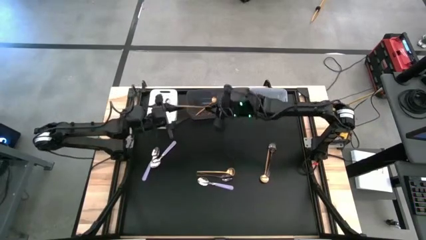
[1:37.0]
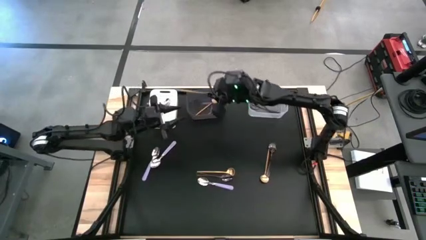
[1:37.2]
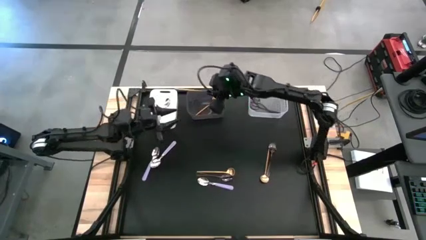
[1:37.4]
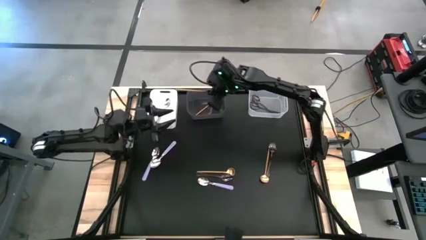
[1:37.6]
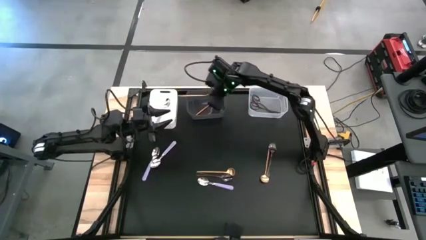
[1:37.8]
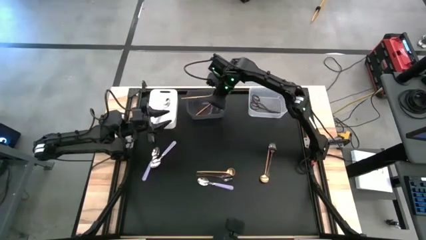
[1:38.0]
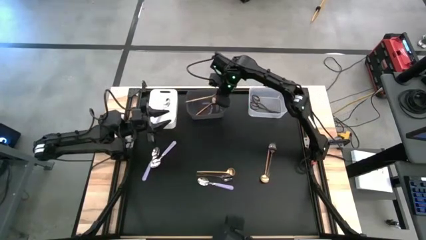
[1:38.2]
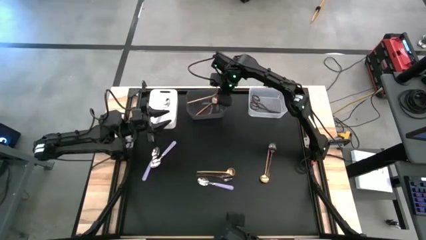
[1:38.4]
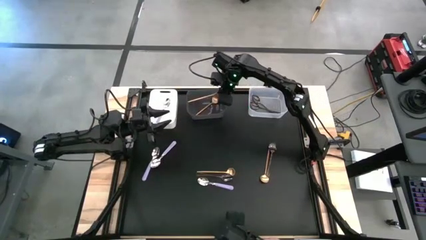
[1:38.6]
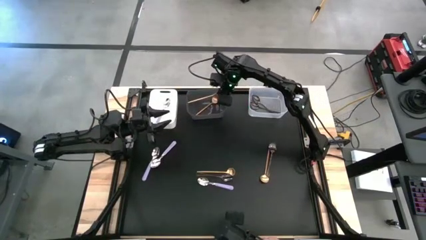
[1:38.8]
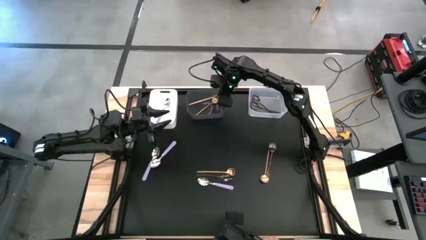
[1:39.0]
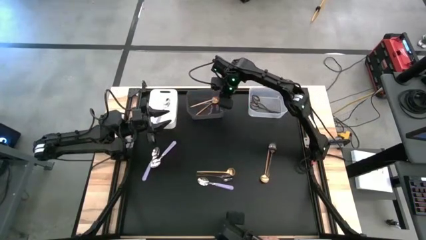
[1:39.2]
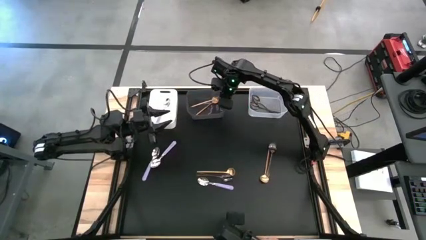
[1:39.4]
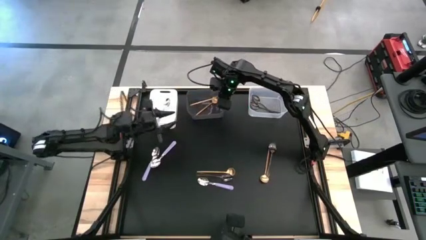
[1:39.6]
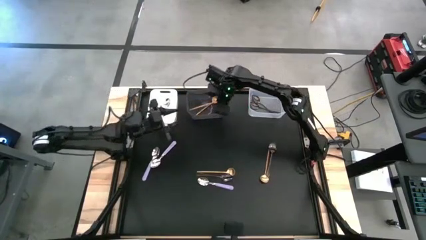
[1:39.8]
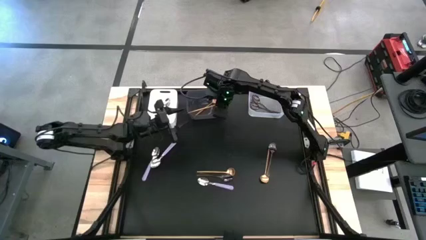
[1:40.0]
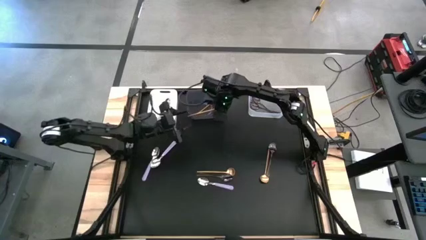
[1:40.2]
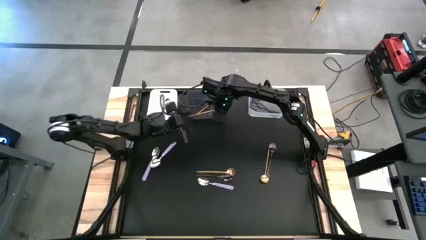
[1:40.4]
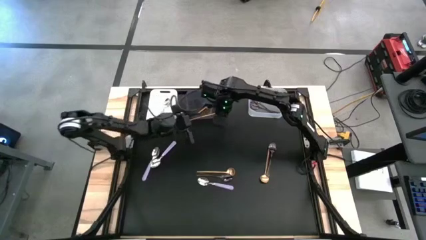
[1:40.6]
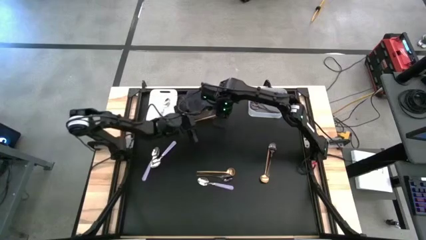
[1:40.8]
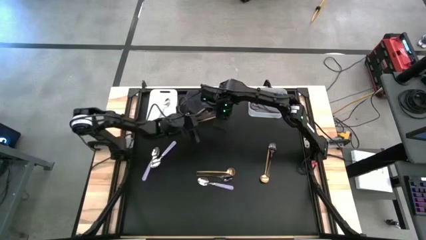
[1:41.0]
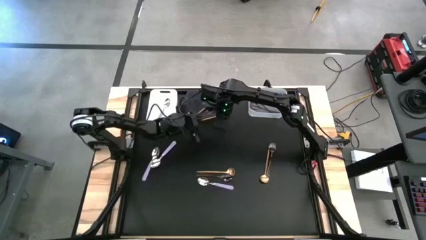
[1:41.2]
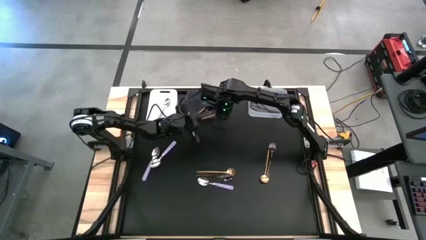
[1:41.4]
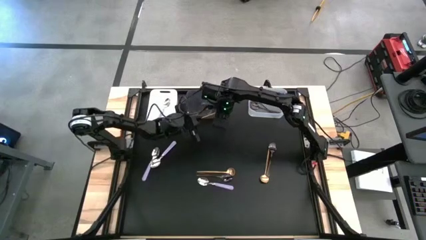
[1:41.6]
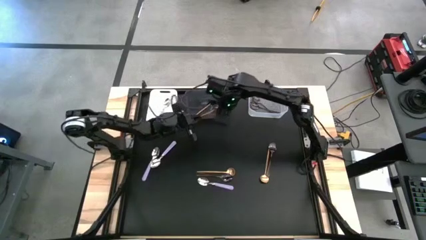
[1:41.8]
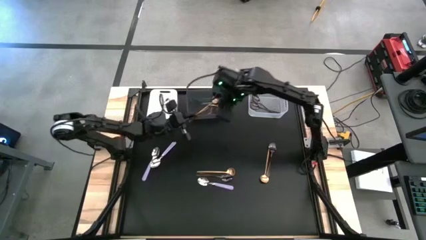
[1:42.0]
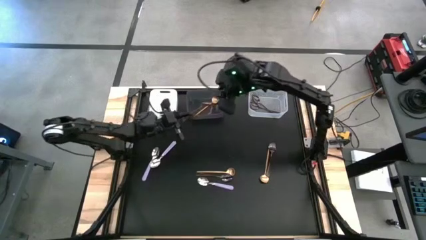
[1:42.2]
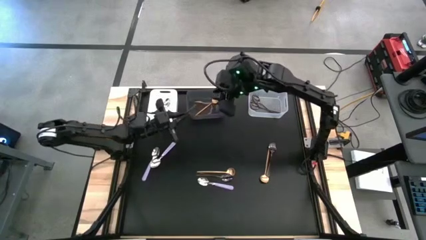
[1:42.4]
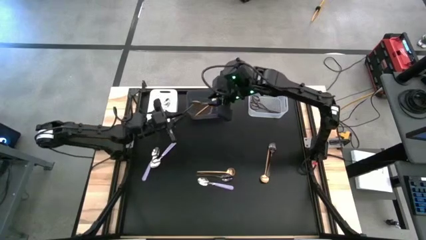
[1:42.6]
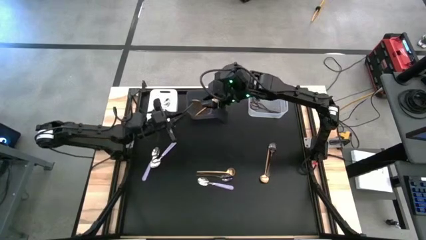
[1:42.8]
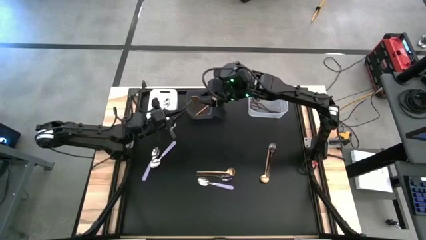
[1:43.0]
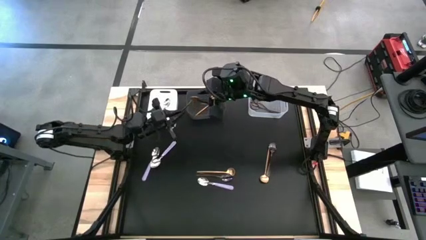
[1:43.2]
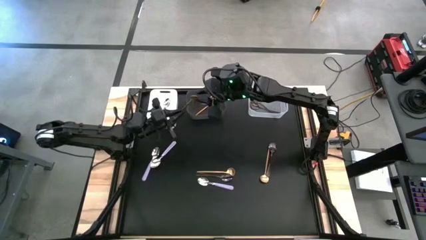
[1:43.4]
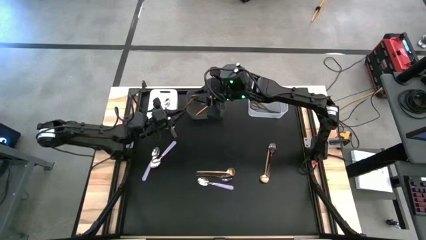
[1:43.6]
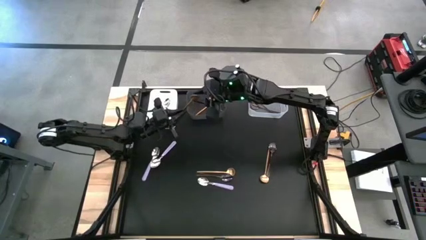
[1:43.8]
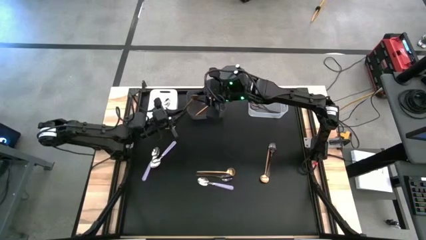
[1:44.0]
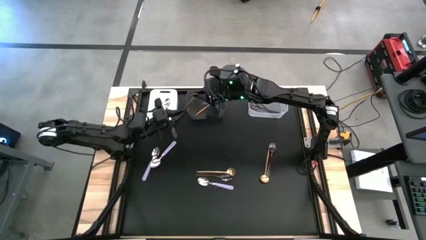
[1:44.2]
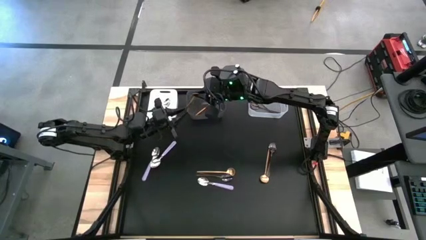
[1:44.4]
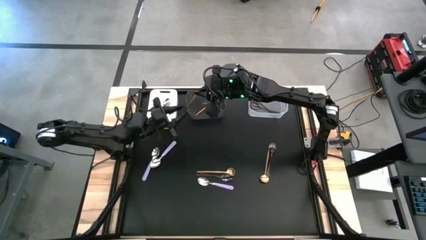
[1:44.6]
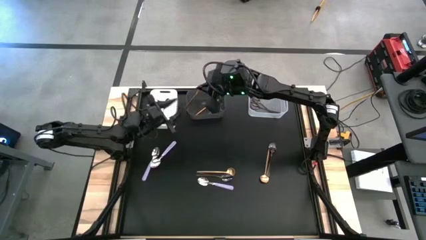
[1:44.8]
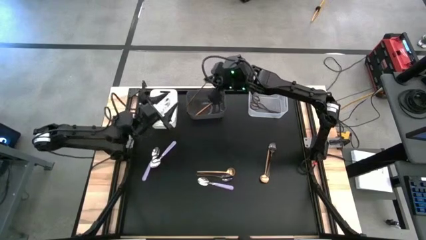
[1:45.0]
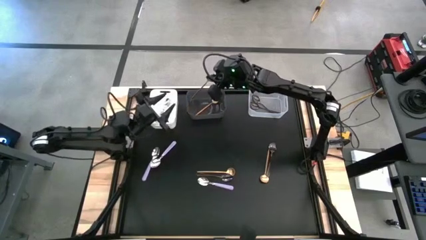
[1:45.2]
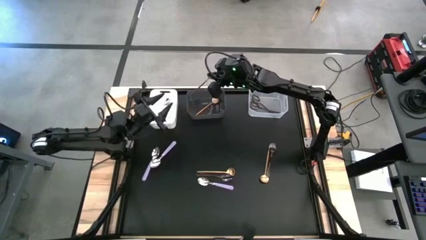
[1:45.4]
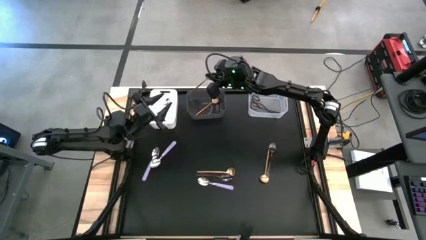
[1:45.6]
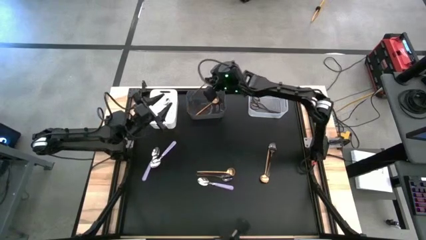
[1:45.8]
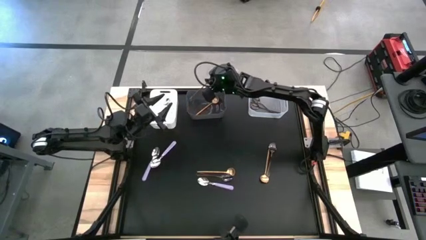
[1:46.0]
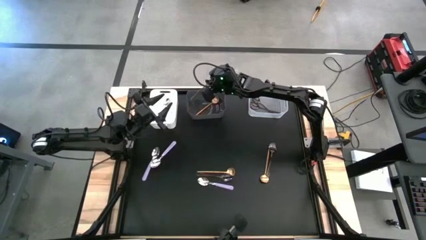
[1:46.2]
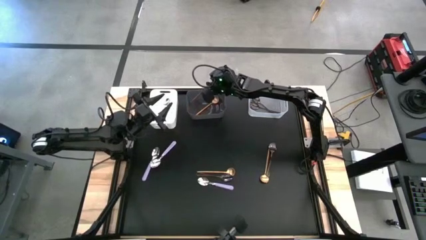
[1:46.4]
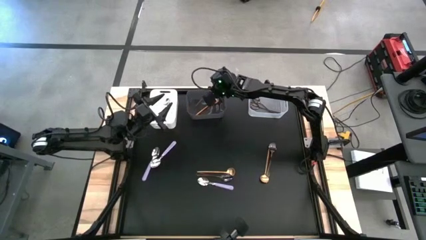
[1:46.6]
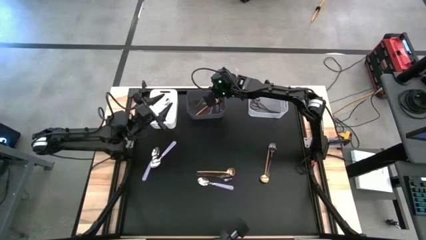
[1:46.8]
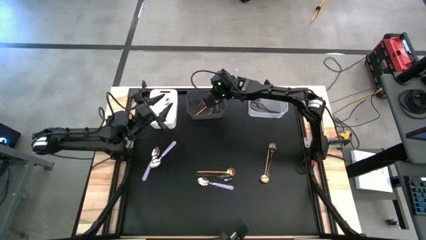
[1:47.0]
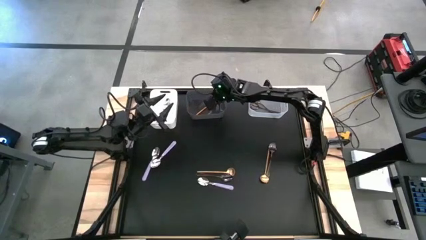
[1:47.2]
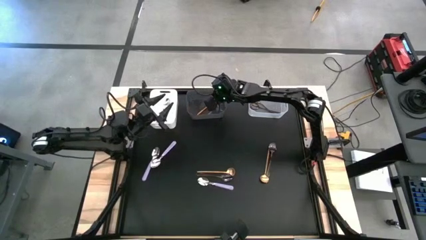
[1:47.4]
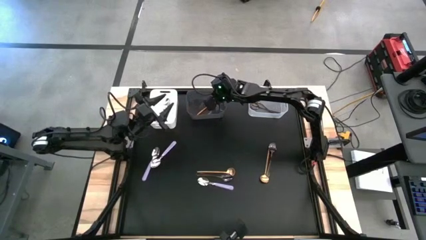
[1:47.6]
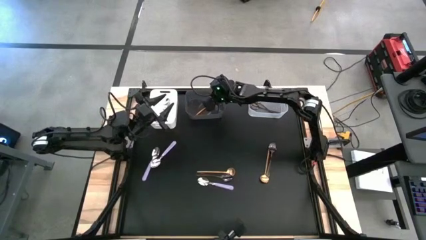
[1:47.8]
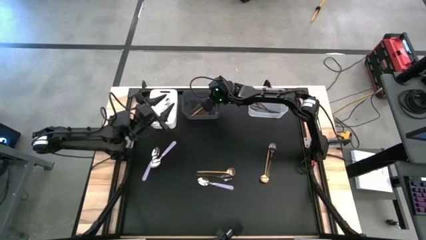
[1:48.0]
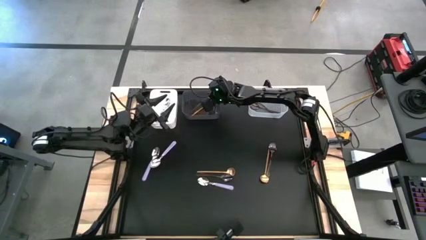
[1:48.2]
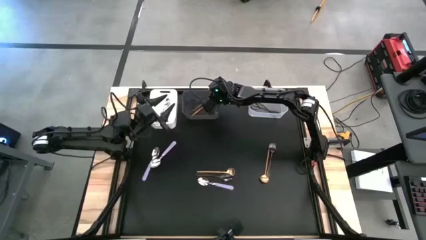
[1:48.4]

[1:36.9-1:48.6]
Task: Sort silverware by color (type)
Put the gold spoon into the black bin
